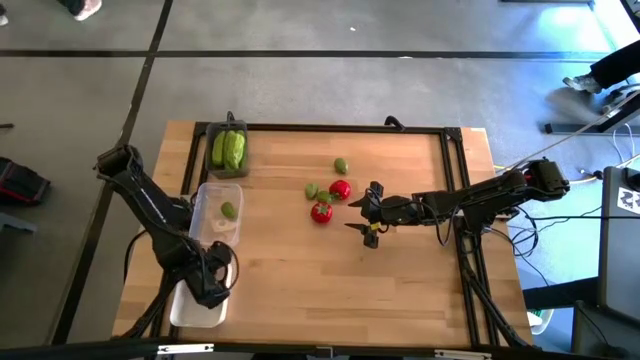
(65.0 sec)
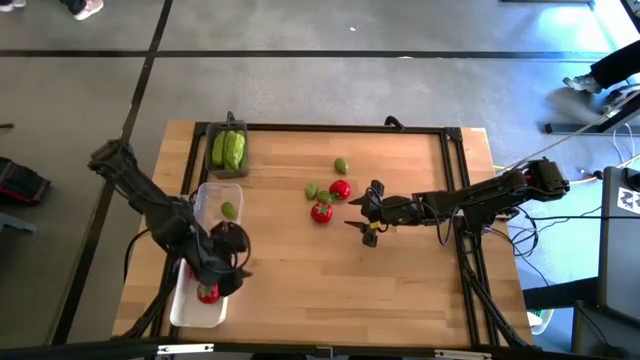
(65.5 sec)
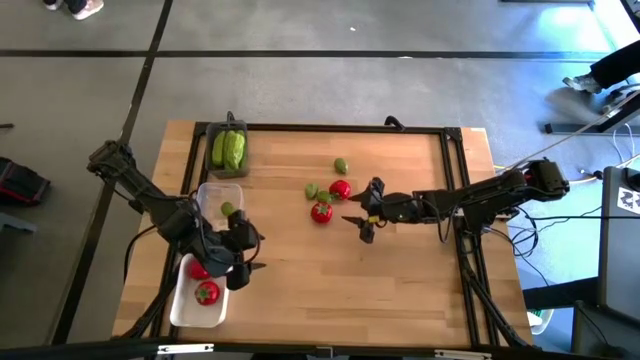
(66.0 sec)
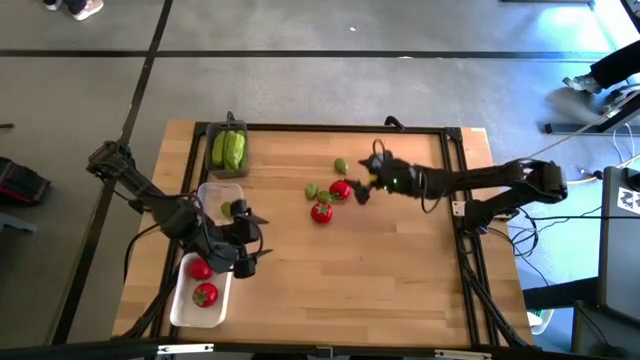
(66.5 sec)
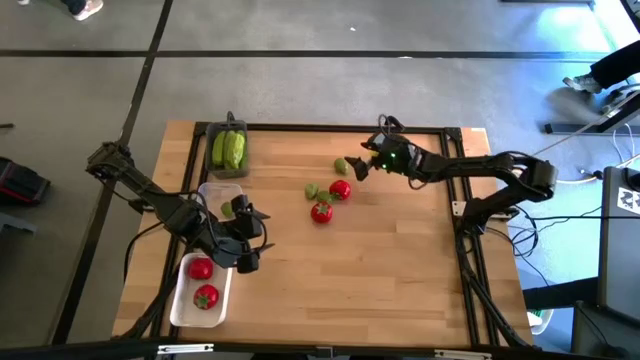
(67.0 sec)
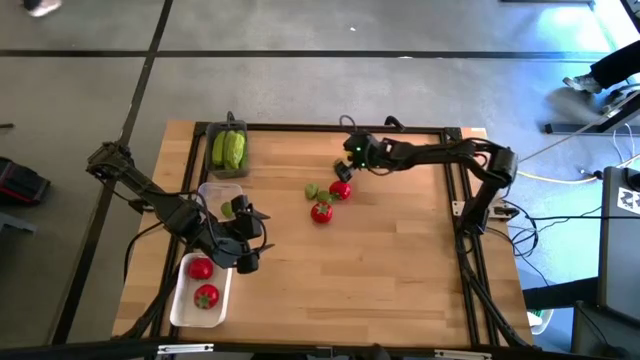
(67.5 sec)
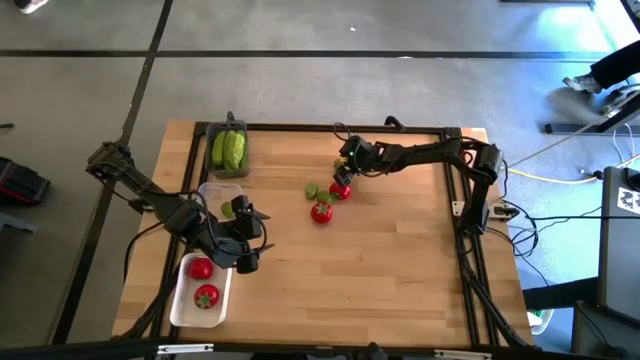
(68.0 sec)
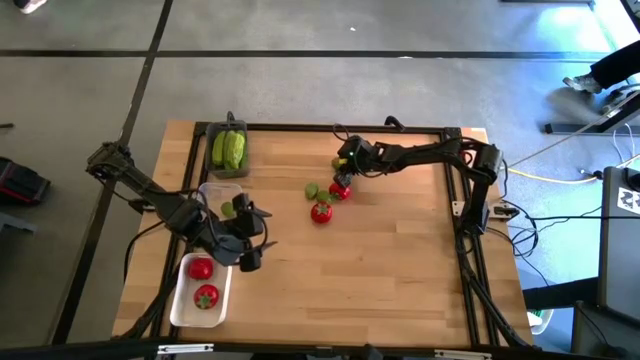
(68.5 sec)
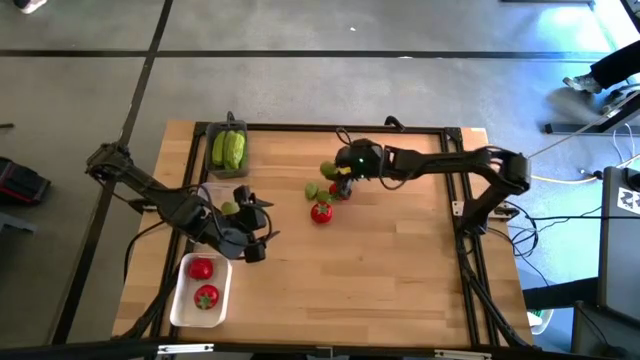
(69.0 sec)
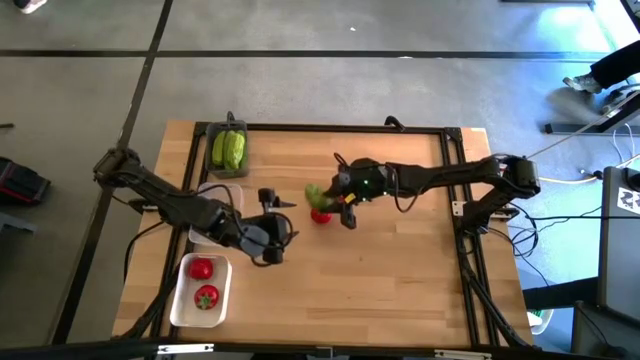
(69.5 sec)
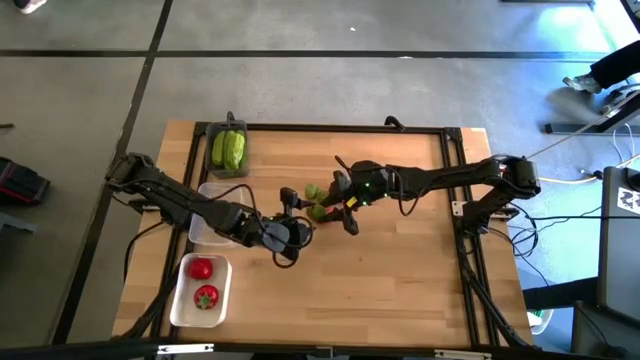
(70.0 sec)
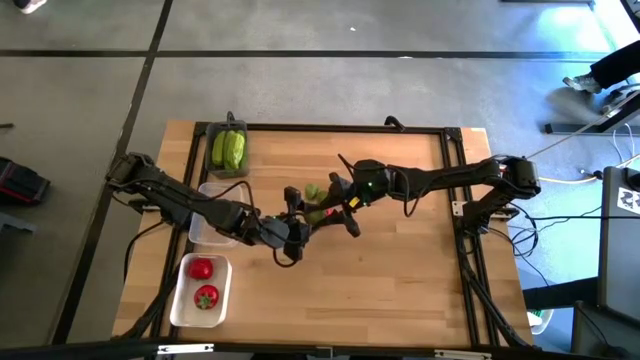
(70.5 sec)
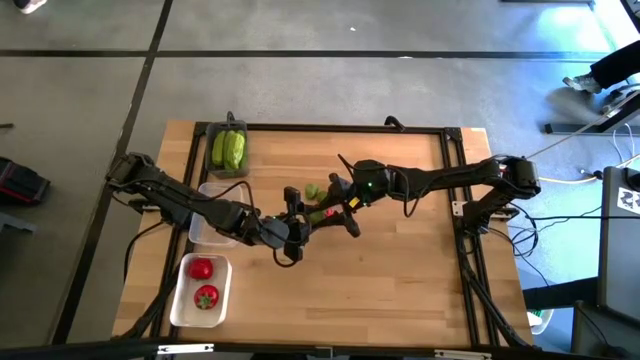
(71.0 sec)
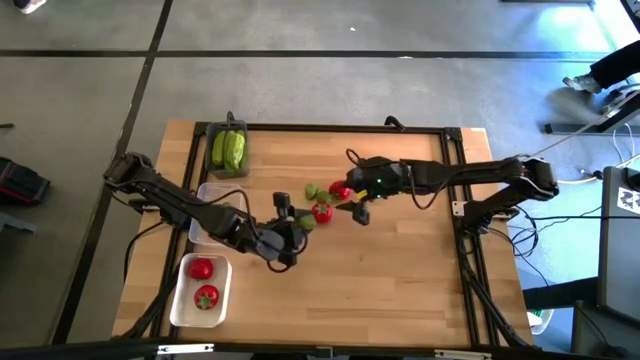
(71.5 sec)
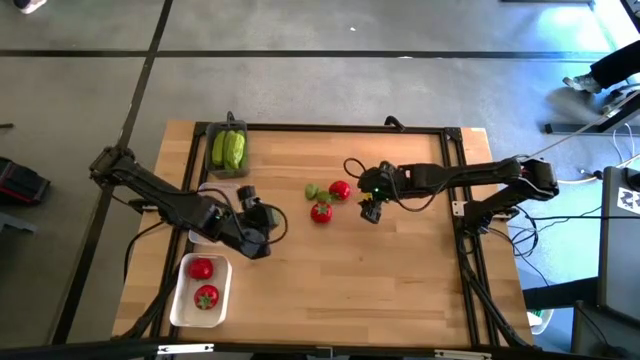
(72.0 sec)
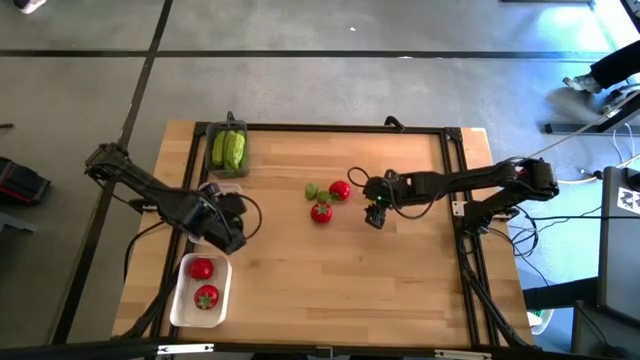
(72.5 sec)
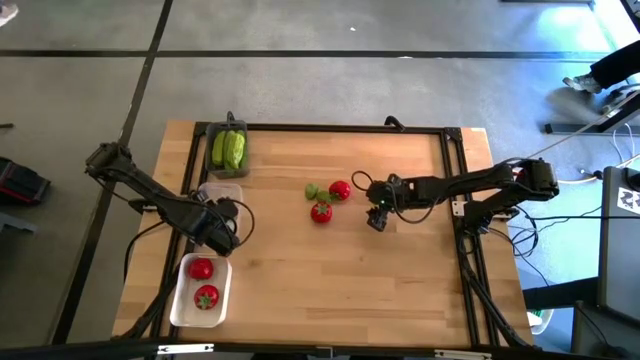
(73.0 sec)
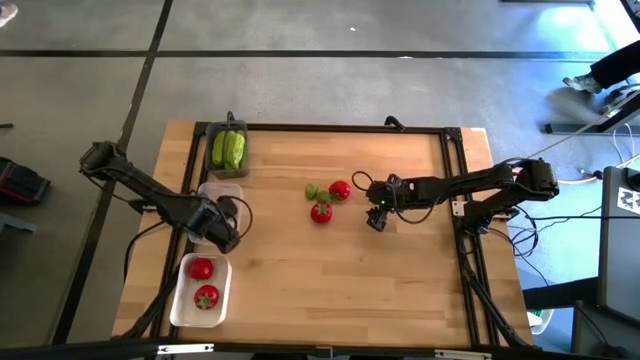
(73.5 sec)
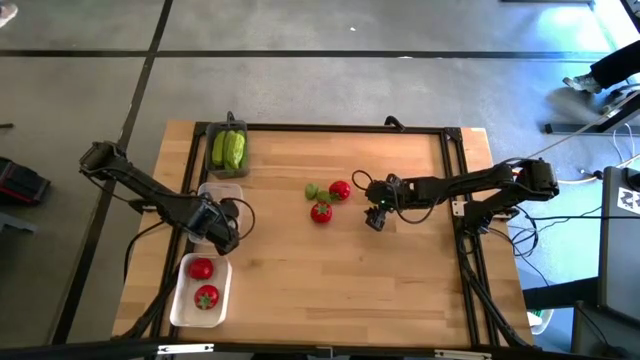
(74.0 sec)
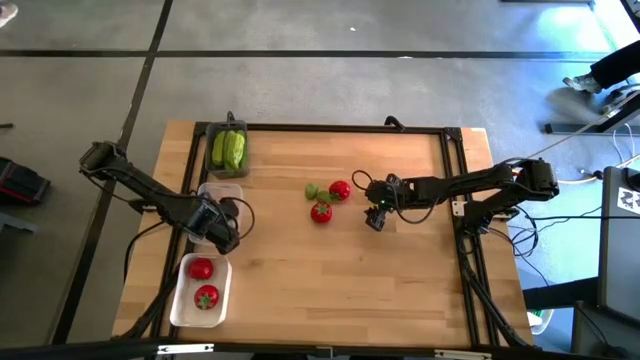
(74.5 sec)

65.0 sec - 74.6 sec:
Task: Sort produce into baskets
Put the lime into the transparent bin

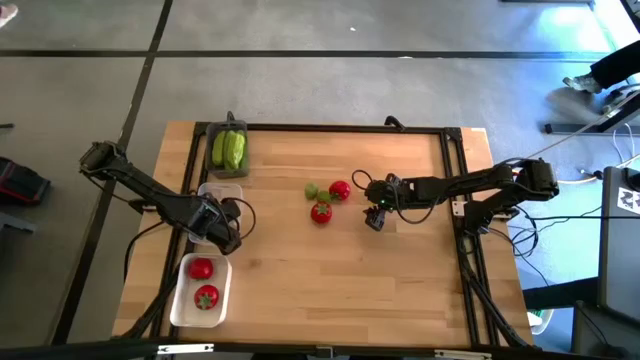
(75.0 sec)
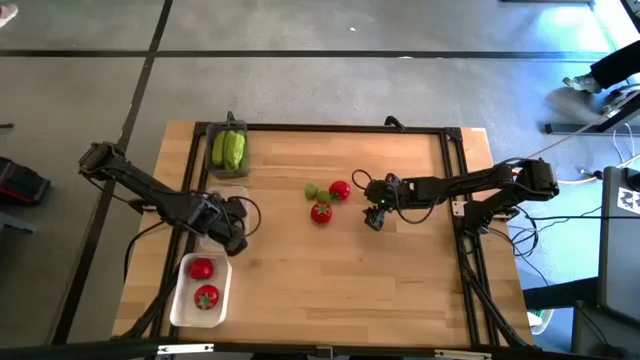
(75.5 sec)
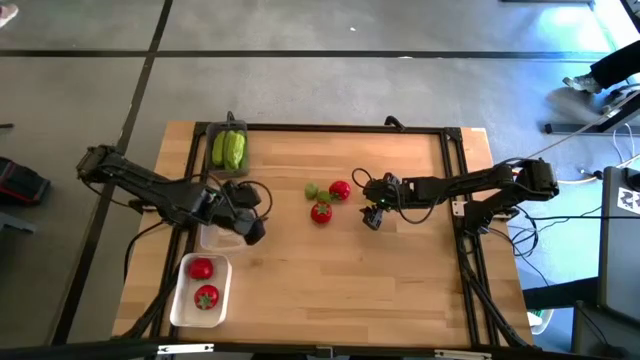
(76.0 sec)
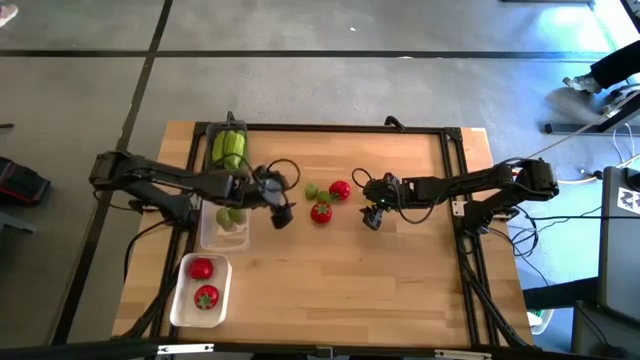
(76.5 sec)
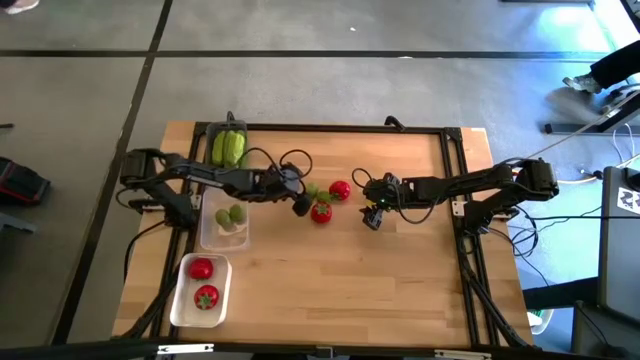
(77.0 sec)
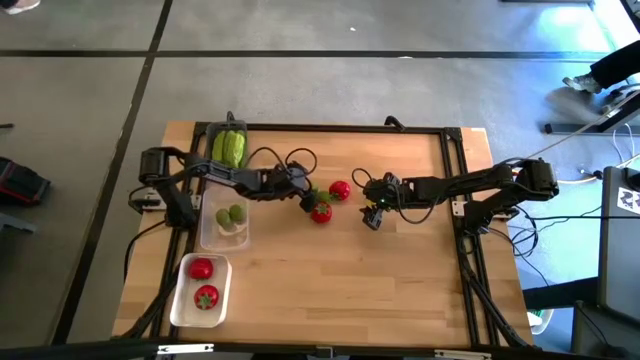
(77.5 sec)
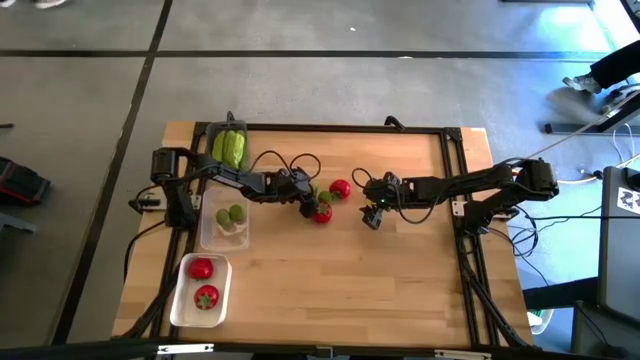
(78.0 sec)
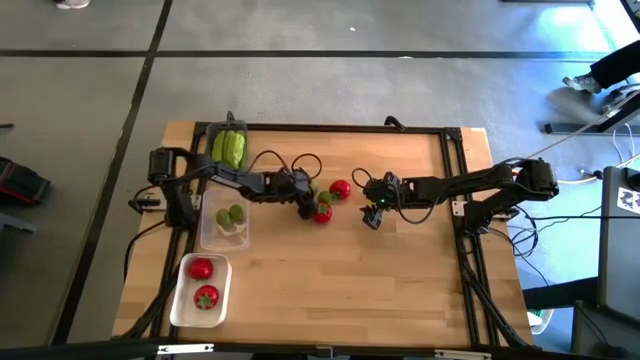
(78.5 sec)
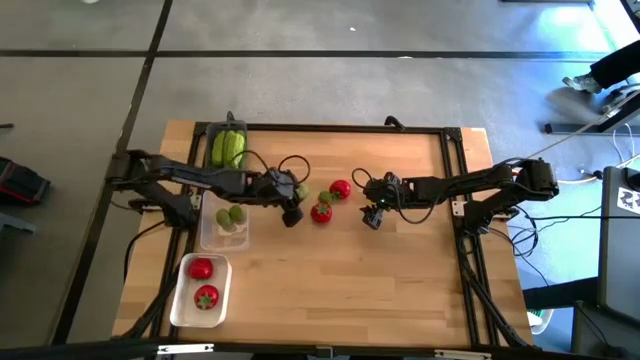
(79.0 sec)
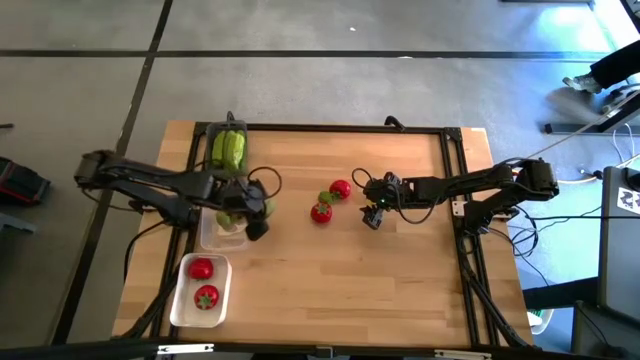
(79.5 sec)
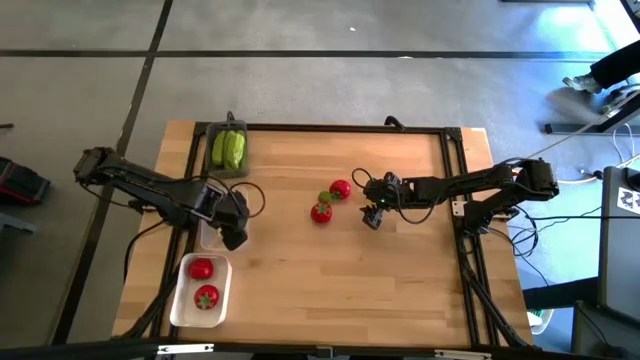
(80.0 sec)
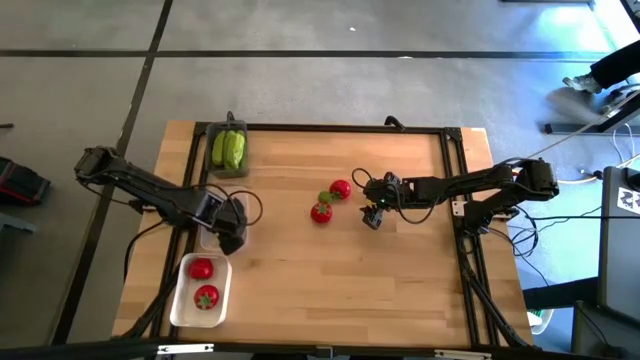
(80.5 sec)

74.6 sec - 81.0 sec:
Put the lime into the transparent bin

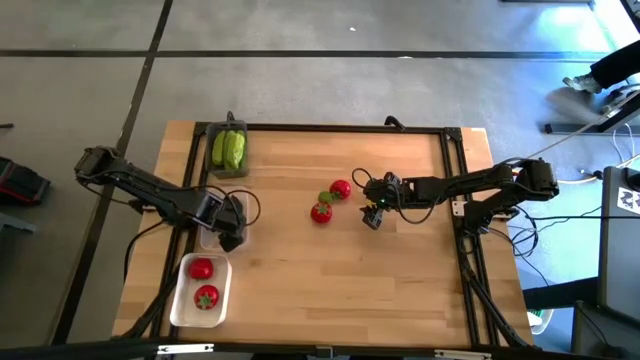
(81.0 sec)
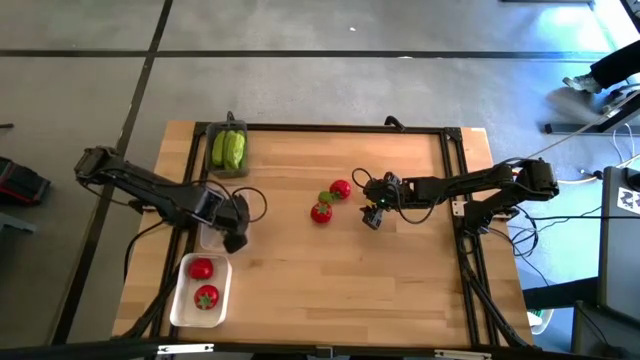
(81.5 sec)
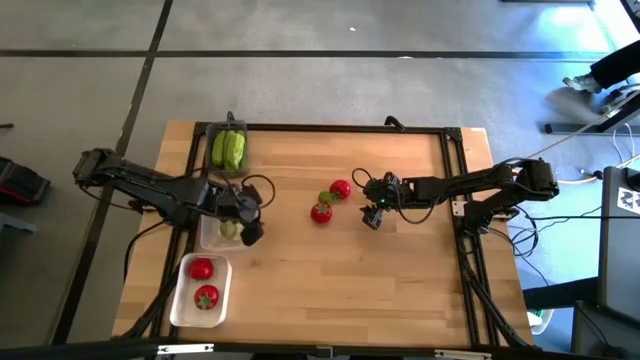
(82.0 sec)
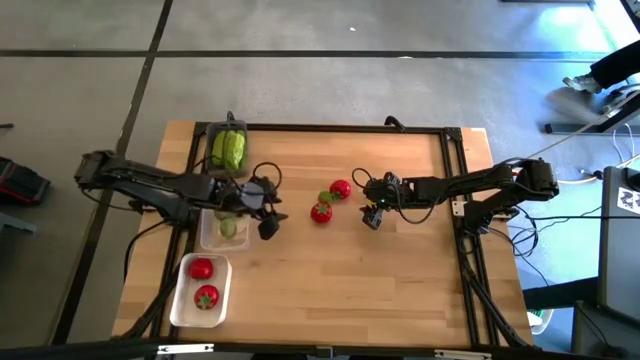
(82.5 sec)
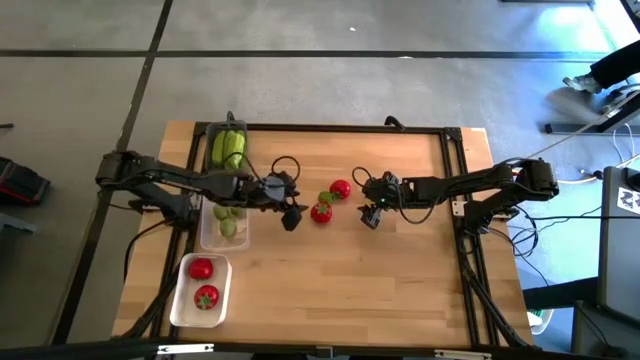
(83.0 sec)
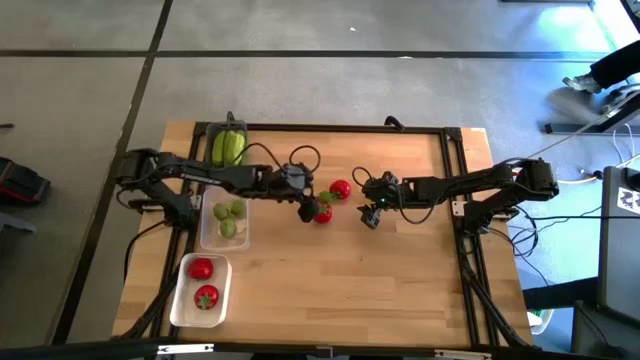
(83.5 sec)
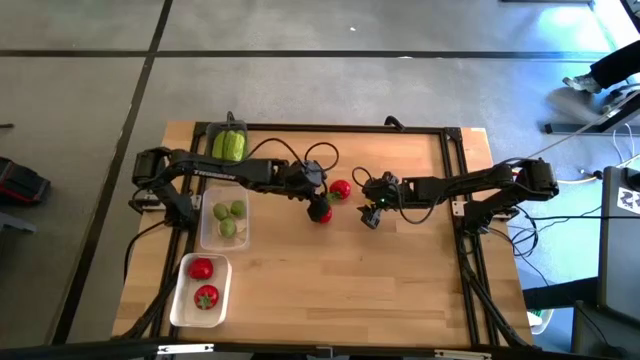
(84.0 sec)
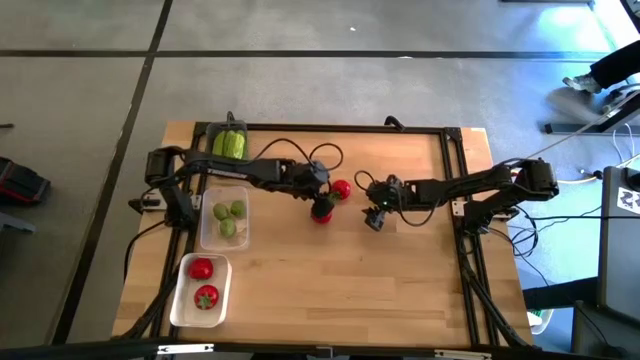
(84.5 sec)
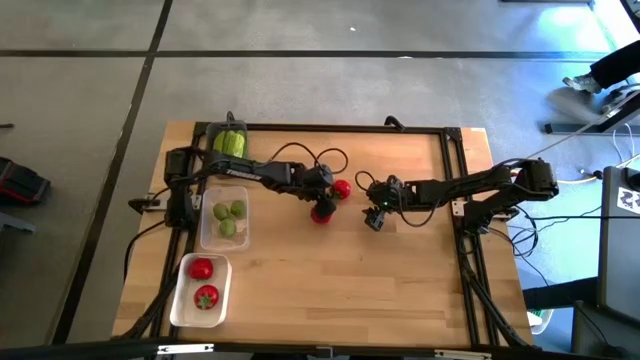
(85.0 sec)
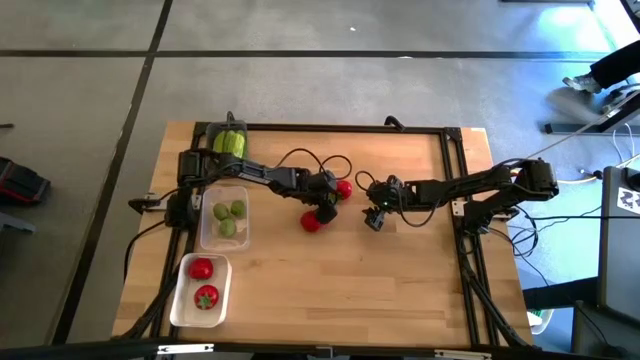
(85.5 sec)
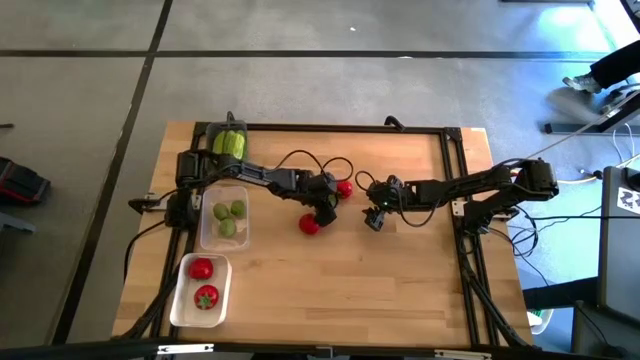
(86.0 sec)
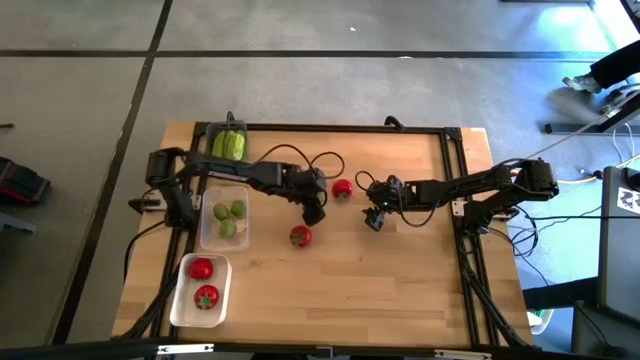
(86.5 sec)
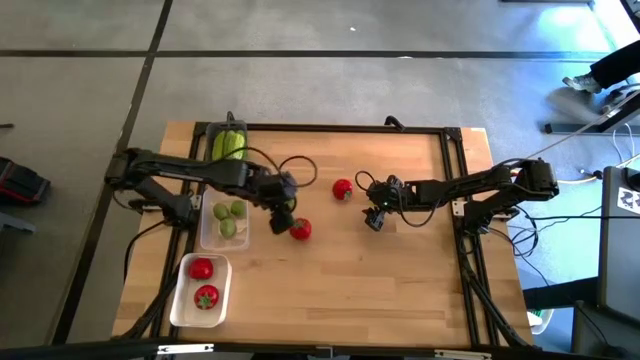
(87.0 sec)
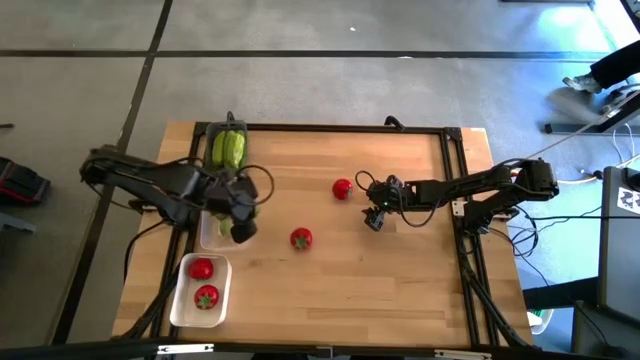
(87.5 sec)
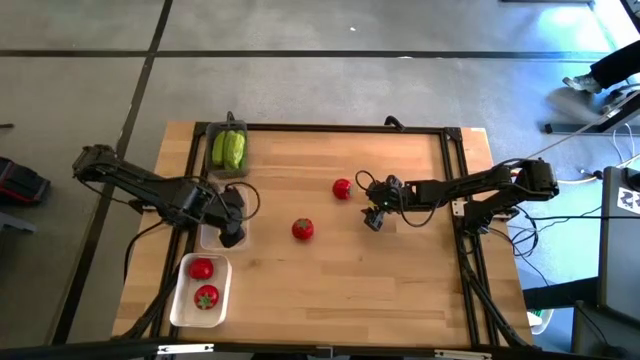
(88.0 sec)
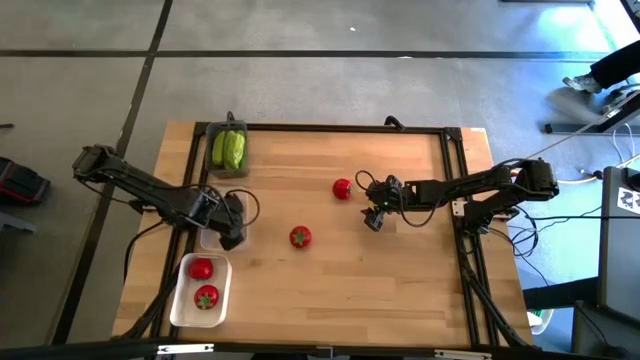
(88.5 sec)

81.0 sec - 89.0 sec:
Put the lime into the transparent bin
